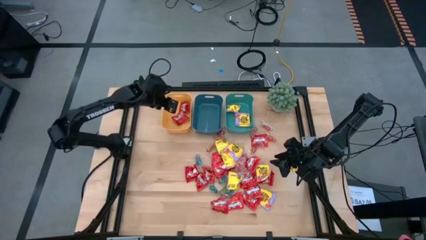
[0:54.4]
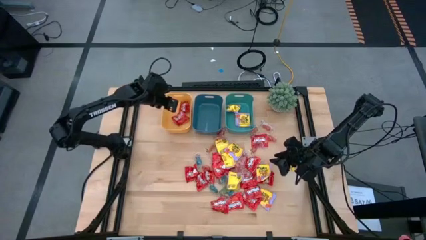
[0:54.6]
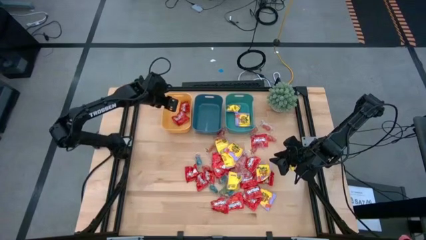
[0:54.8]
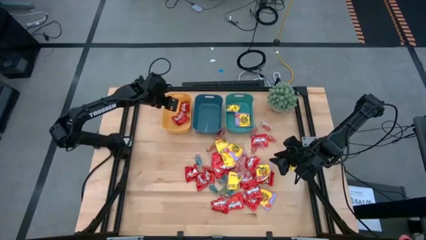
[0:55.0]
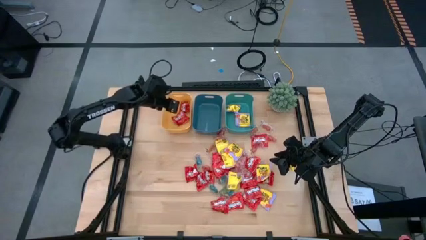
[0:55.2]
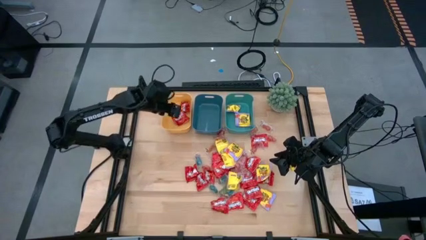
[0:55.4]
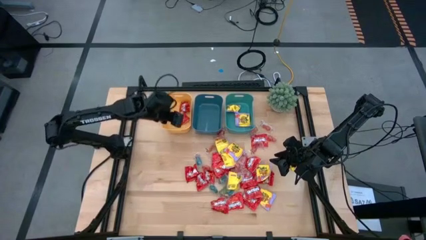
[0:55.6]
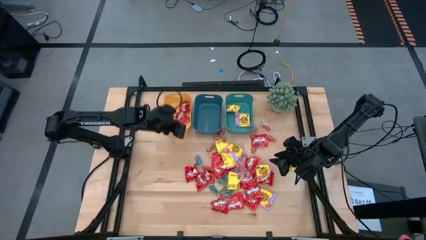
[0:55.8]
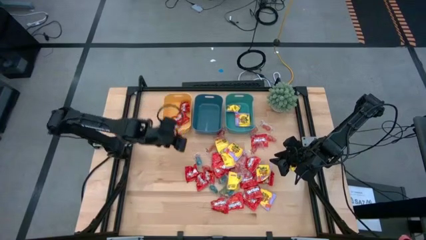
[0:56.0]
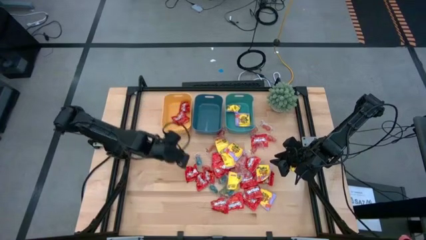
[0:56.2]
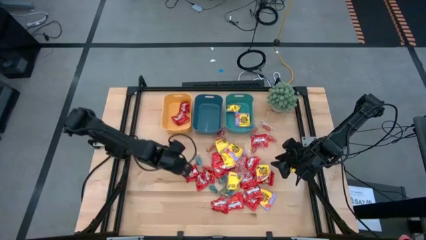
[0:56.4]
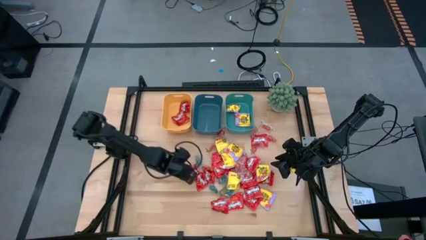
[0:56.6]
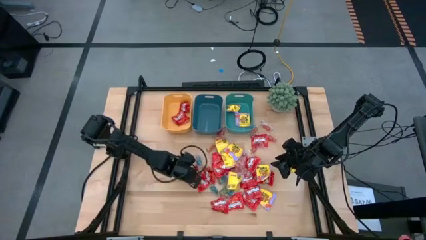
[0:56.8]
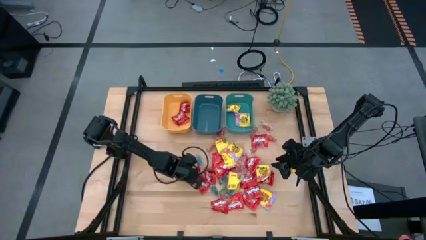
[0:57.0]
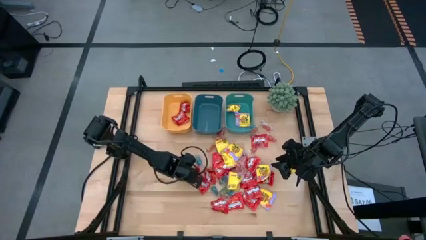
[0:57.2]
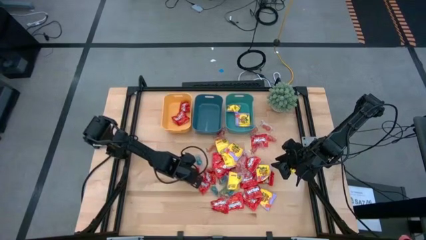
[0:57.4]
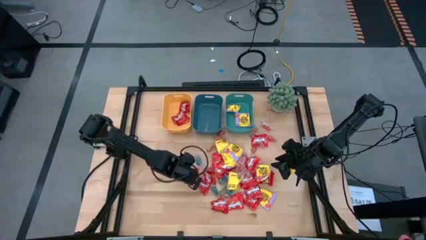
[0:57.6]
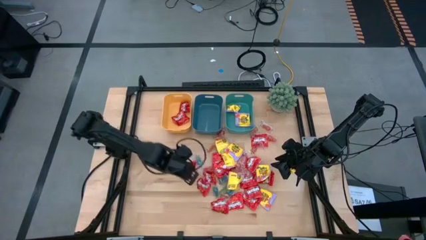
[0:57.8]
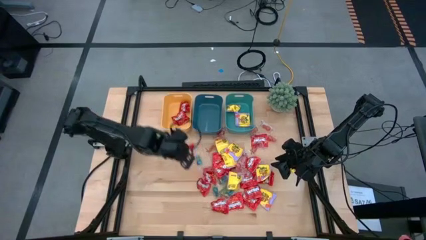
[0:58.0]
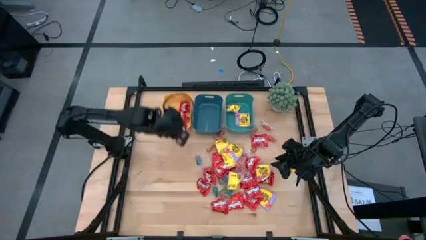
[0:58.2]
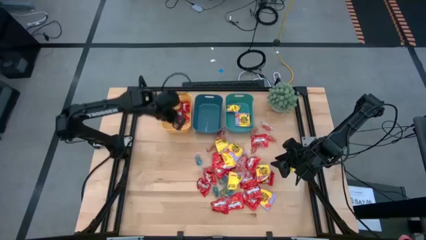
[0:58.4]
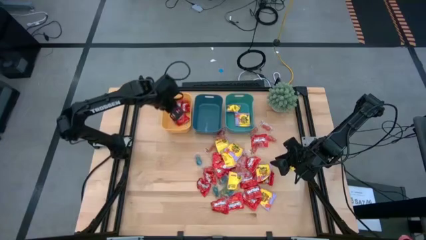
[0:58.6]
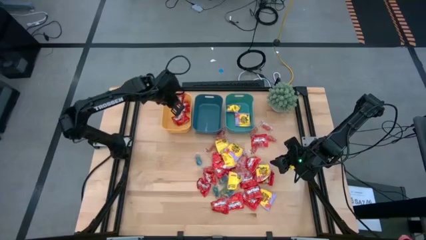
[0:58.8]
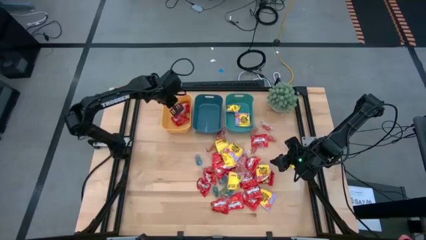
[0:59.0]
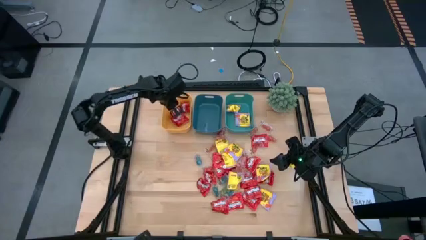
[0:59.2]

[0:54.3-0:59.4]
Task: Sort candy
Put the red candy into the yellow bin

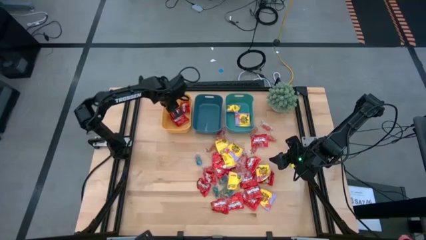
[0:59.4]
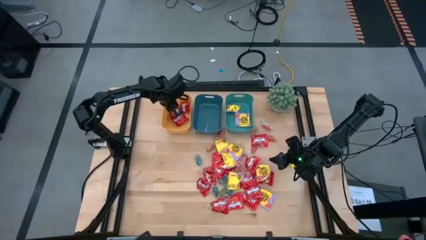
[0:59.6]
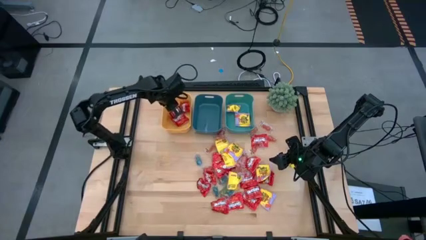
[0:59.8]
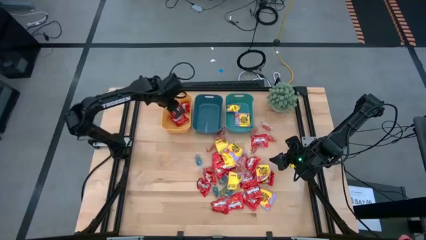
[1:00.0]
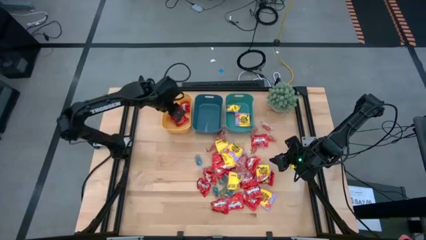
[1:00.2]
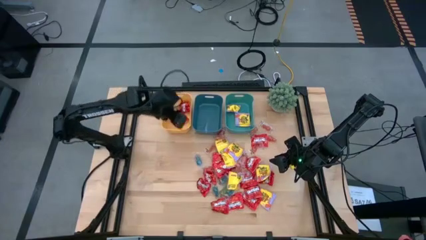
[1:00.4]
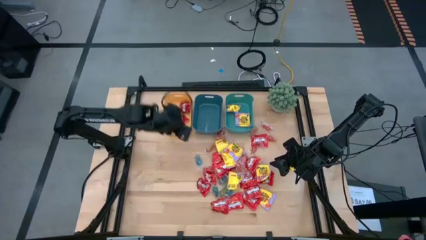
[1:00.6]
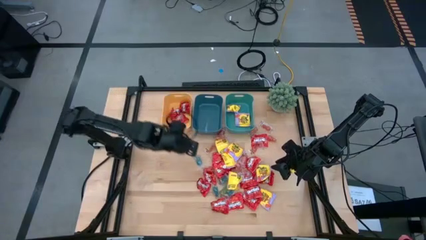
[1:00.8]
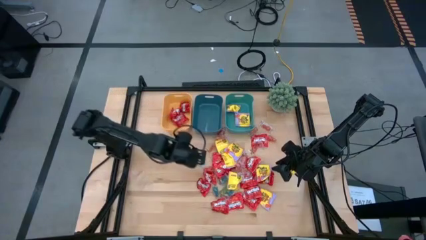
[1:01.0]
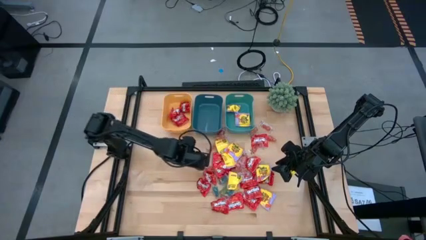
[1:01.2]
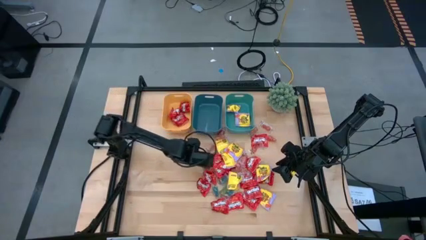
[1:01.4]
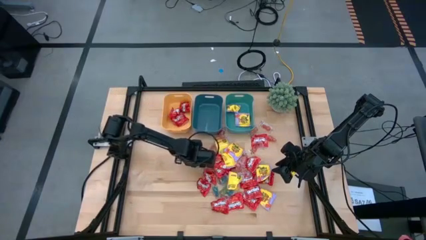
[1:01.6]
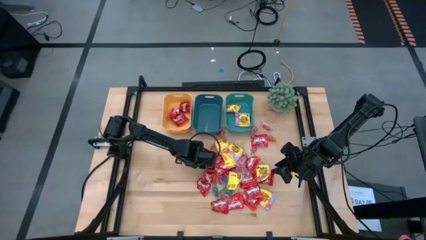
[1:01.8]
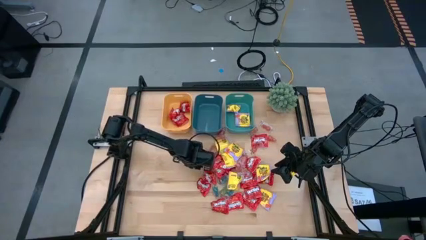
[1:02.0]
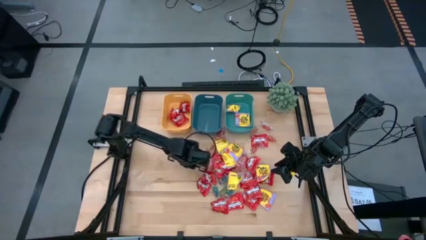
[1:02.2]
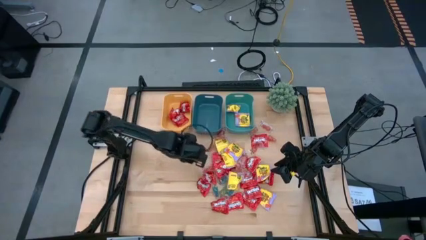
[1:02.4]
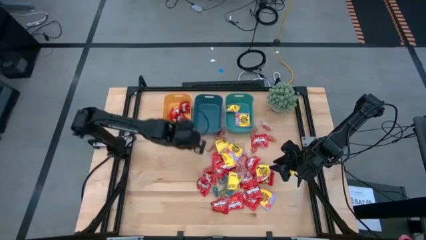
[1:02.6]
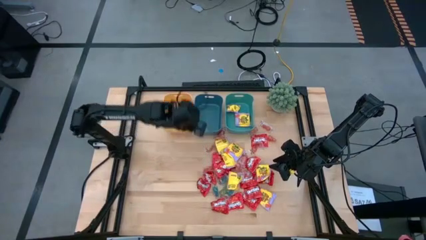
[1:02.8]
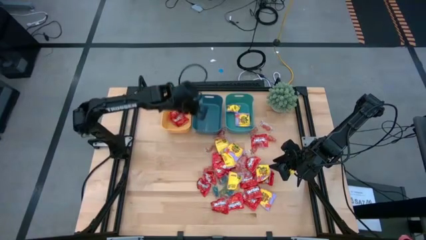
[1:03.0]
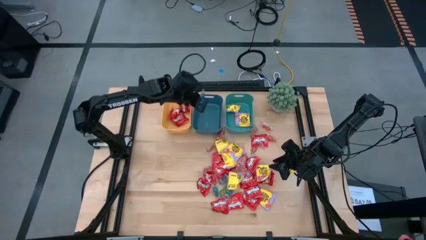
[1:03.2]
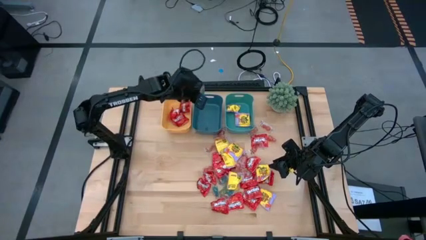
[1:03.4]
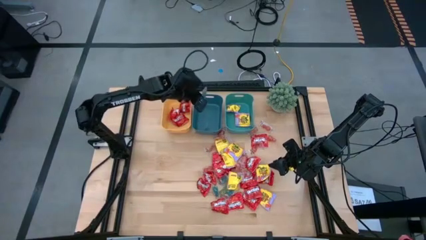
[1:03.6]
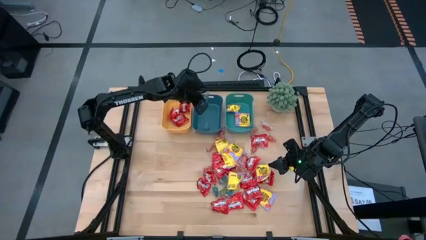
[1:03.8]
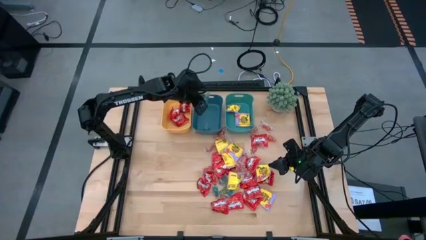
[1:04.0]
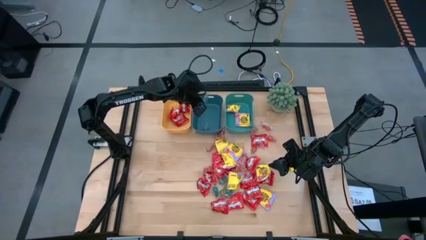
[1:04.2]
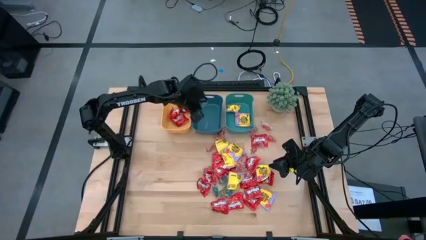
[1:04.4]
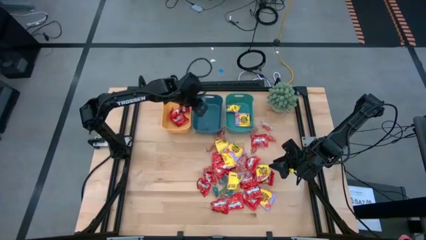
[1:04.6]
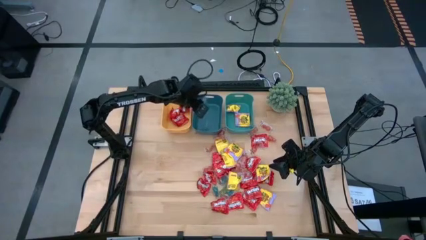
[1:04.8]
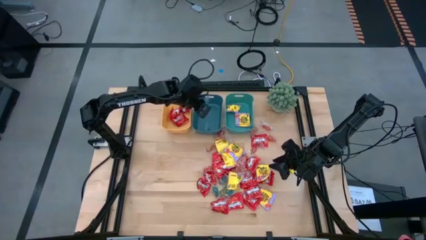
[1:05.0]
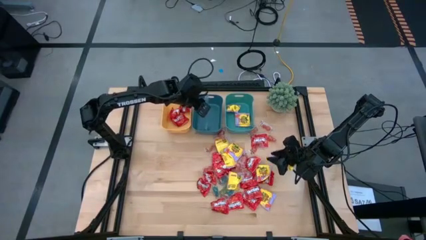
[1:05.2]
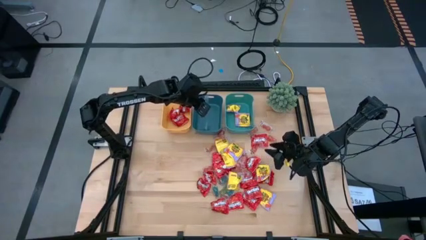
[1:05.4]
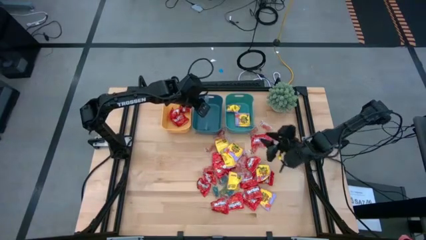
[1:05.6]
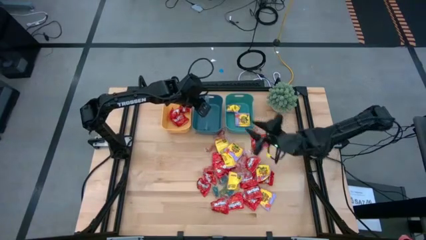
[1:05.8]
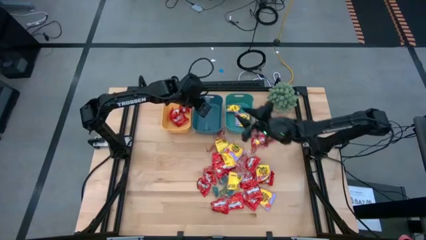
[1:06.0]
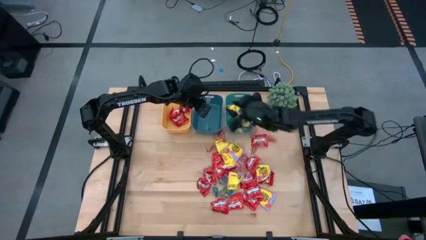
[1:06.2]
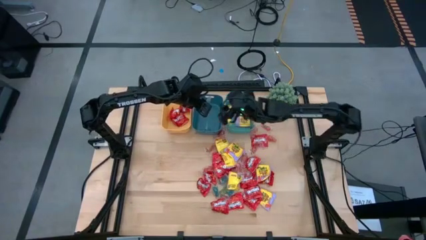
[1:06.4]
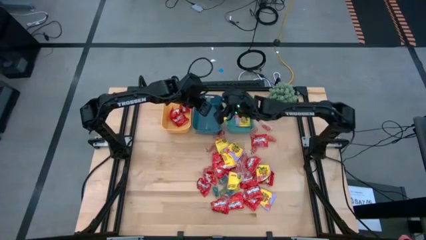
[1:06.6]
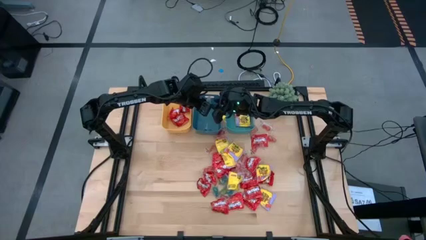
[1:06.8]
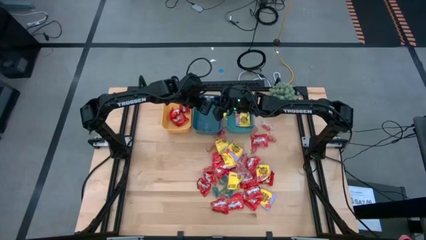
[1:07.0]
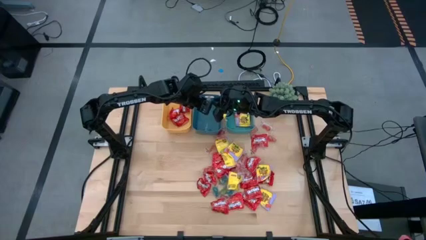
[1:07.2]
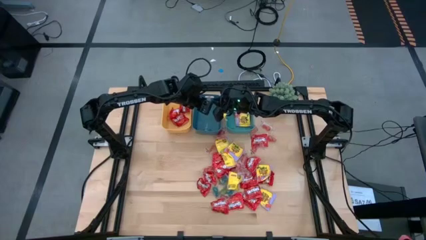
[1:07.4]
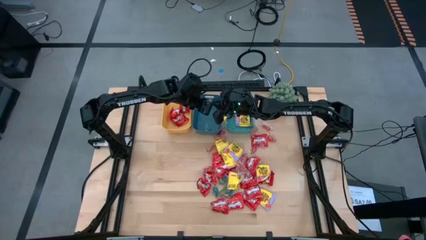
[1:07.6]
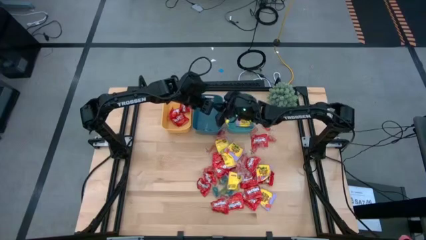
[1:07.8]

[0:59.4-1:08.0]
Put the transparent blue gummy into the blue bin

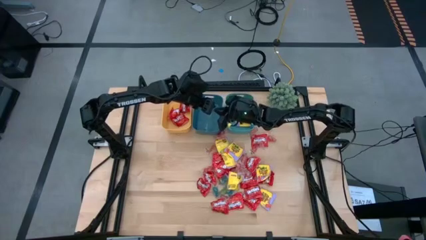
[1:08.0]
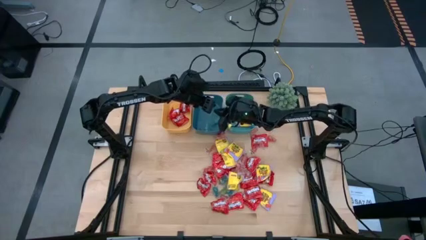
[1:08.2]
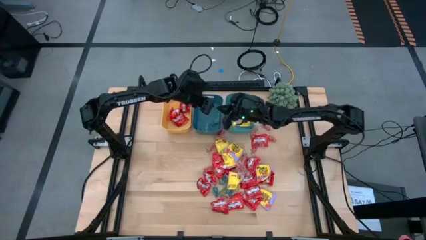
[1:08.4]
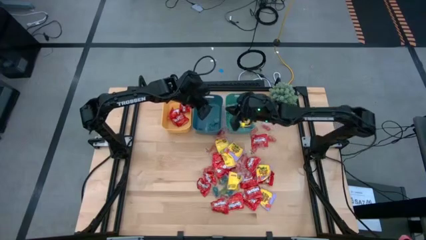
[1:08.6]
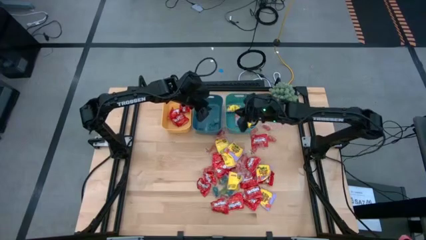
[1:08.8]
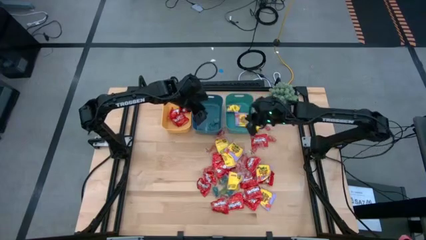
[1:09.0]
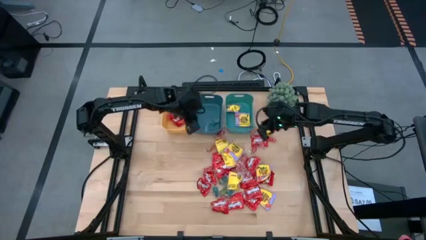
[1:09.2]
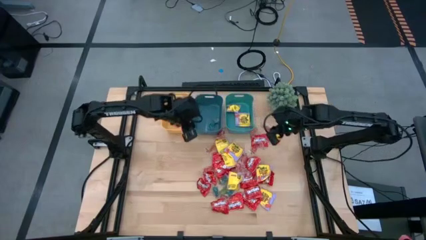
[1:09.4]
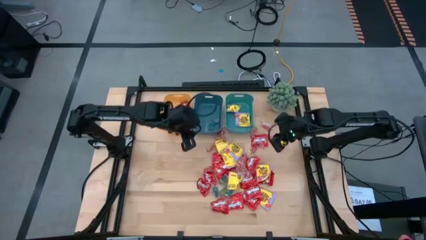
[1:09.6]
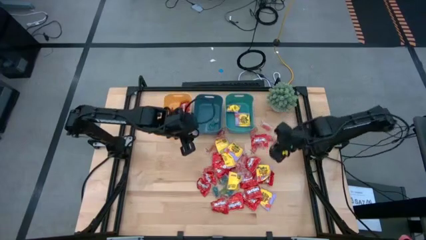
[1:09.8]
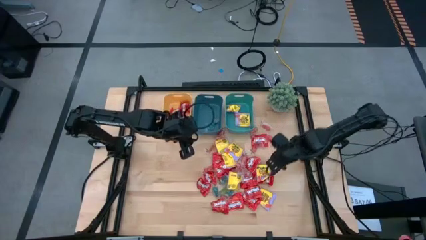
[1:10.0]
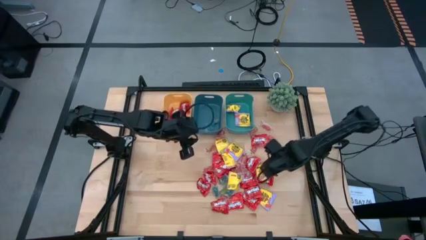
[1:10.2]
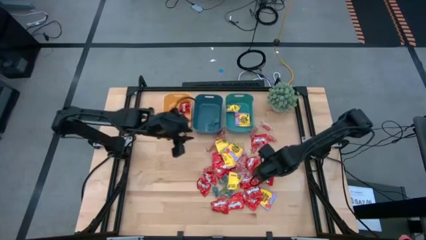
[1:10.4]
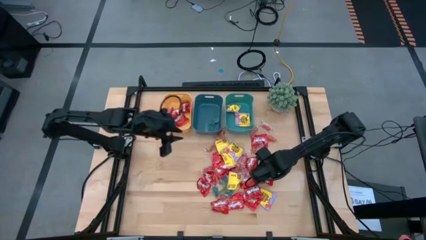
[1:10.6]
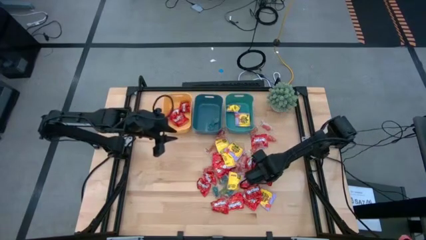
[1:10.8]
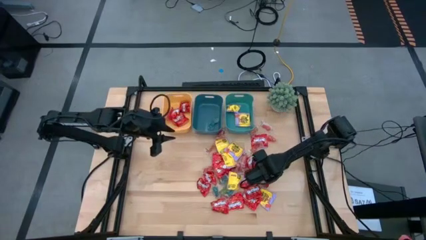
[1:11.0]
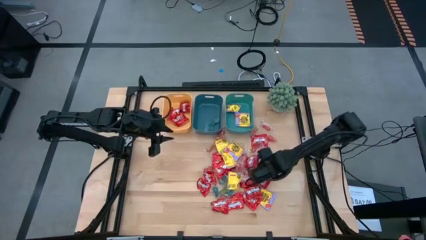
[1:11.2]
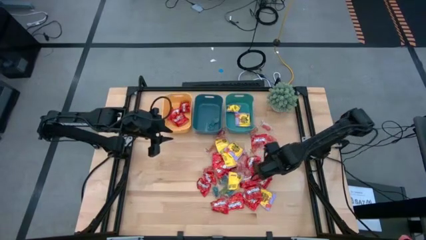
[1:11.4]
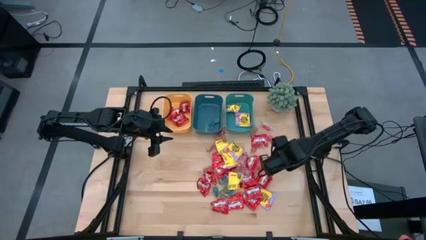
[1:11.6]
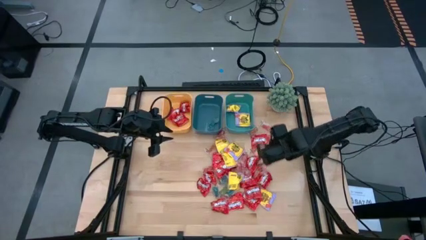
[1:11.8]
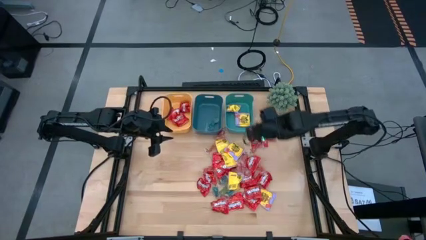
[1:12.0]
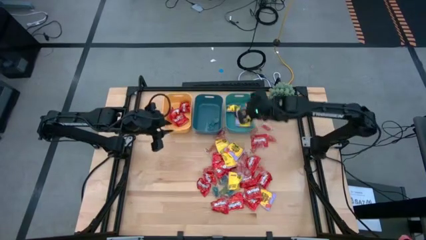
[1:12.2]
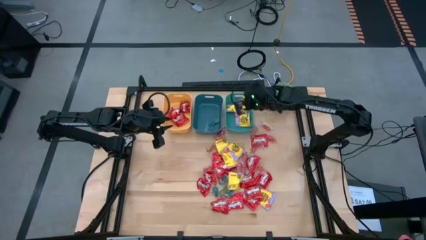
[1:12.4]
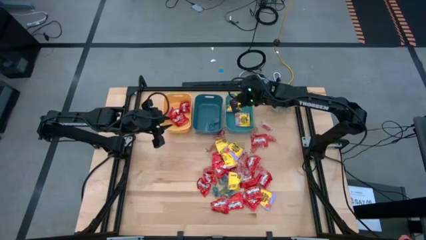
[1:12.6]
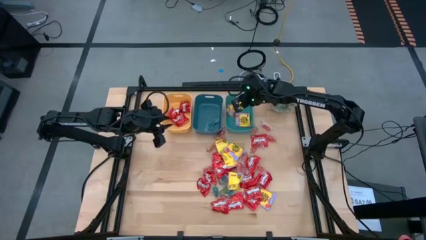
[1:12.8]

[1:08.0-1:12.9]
Put the yellow candy into the green bin
